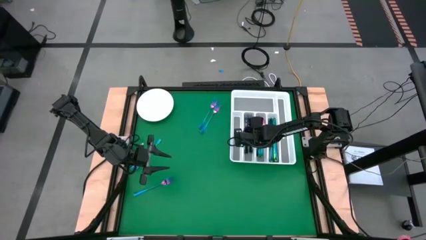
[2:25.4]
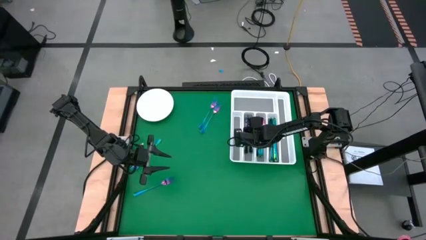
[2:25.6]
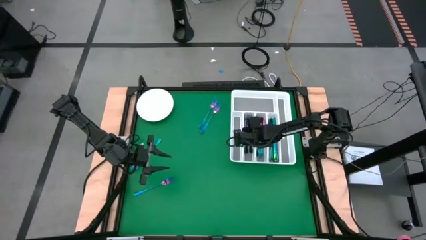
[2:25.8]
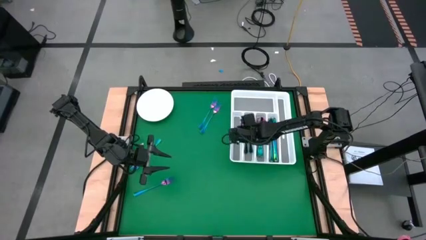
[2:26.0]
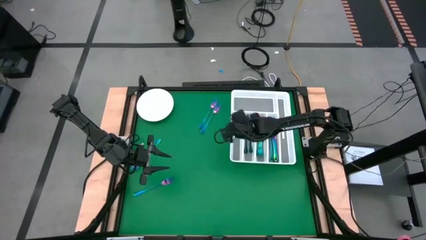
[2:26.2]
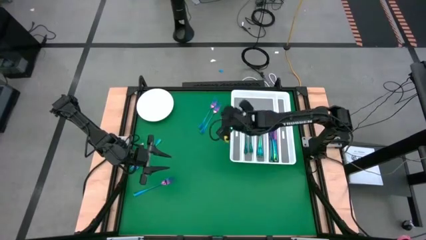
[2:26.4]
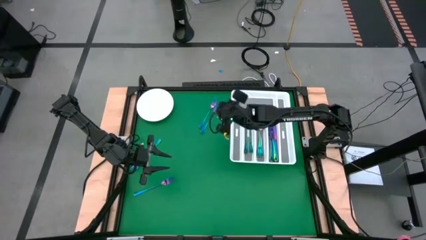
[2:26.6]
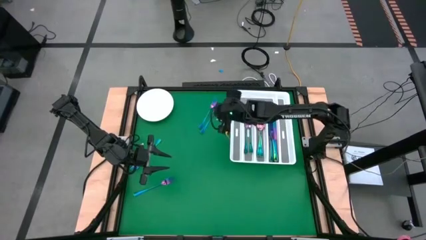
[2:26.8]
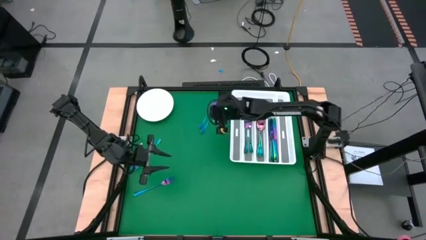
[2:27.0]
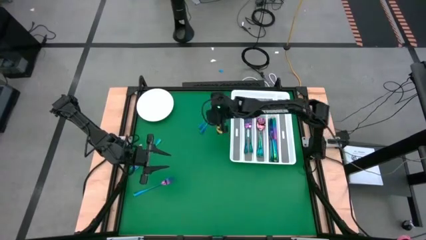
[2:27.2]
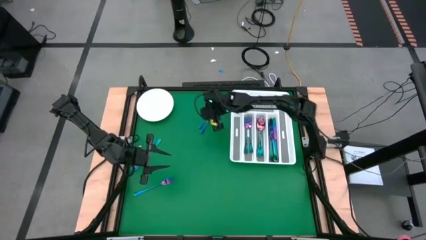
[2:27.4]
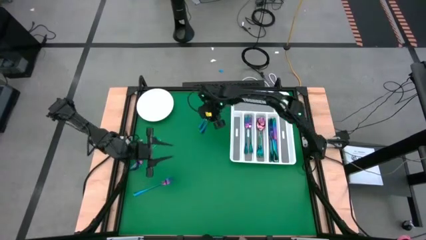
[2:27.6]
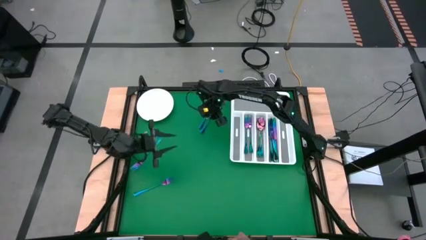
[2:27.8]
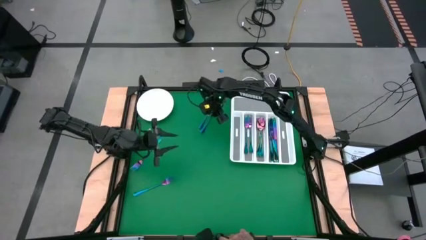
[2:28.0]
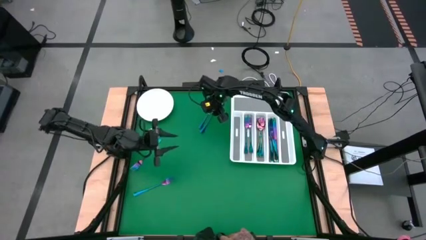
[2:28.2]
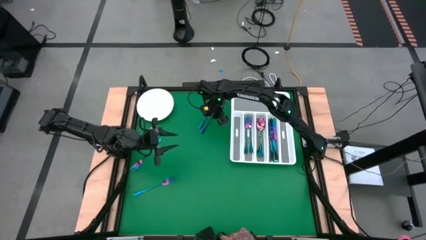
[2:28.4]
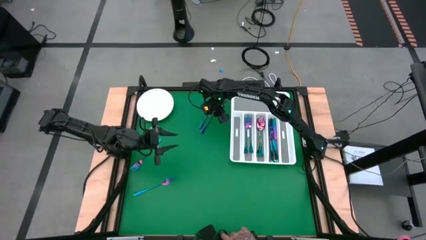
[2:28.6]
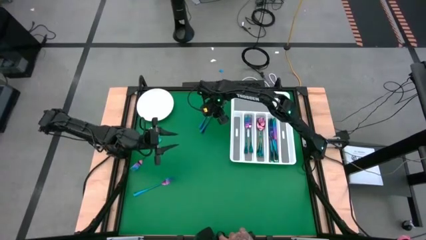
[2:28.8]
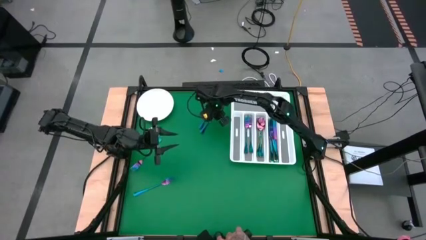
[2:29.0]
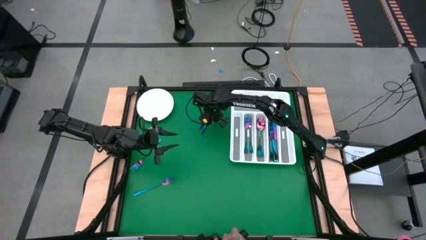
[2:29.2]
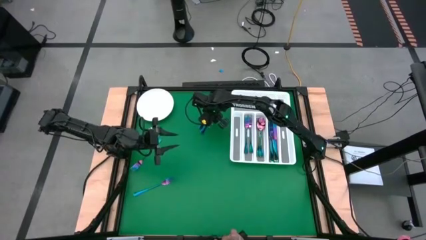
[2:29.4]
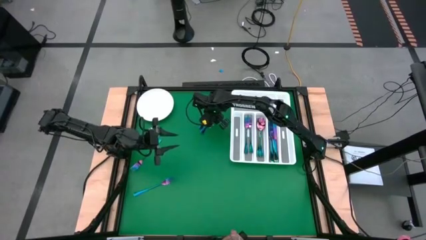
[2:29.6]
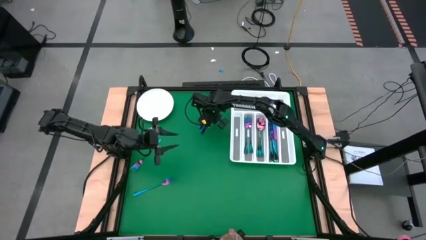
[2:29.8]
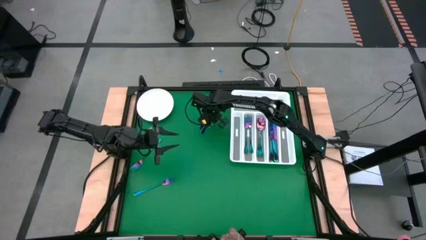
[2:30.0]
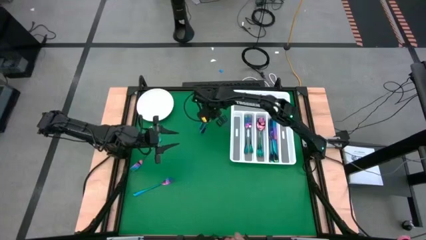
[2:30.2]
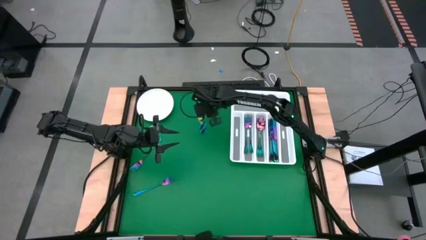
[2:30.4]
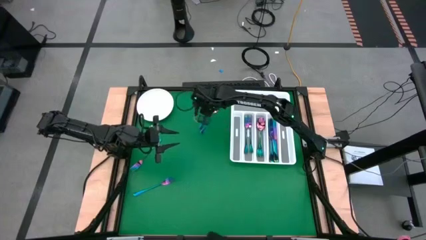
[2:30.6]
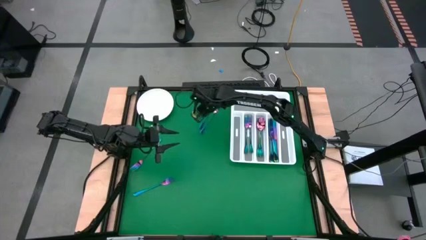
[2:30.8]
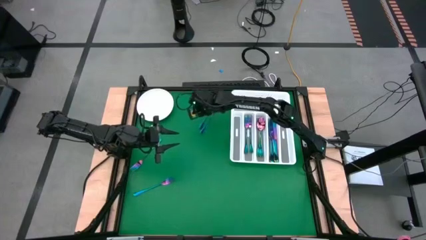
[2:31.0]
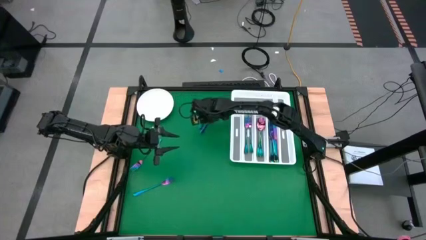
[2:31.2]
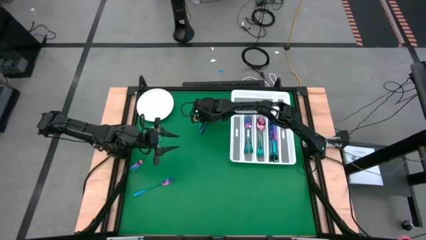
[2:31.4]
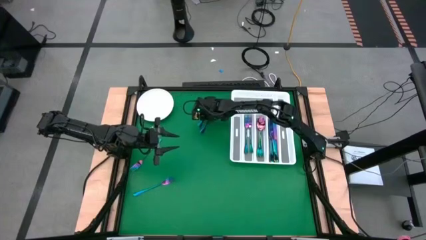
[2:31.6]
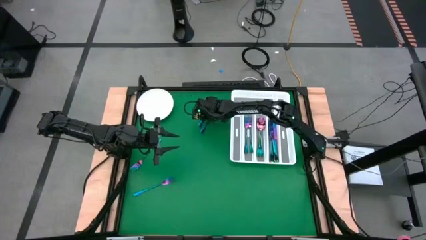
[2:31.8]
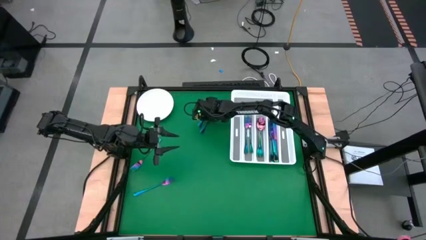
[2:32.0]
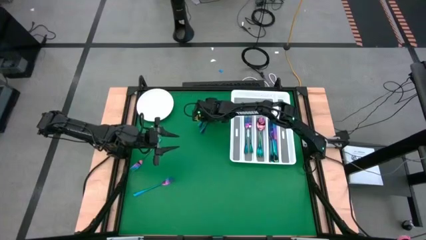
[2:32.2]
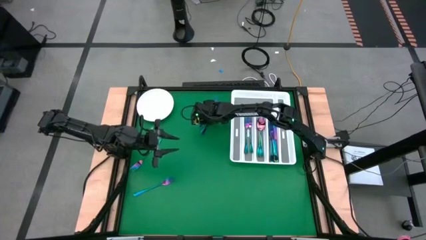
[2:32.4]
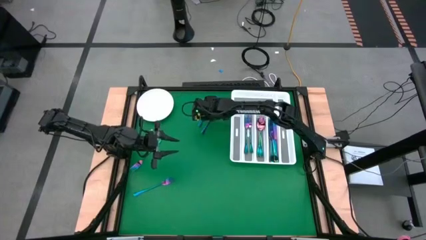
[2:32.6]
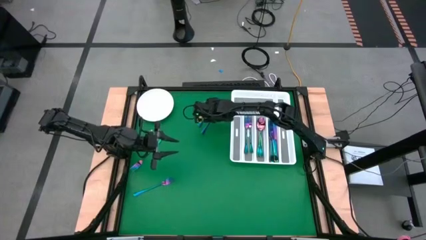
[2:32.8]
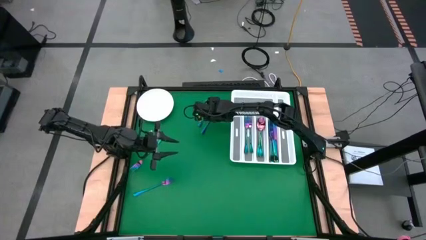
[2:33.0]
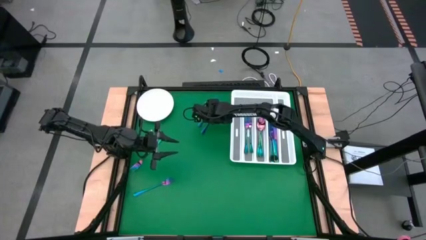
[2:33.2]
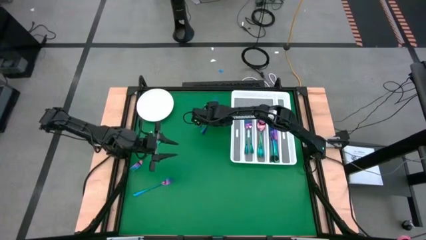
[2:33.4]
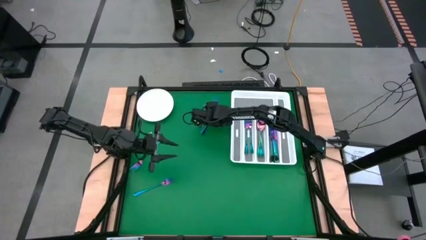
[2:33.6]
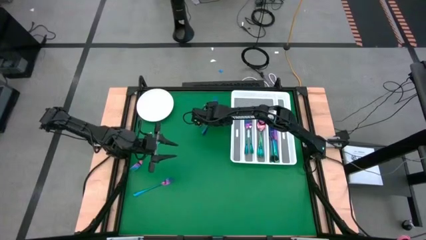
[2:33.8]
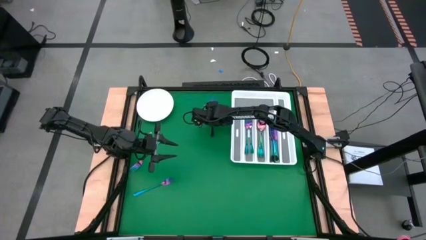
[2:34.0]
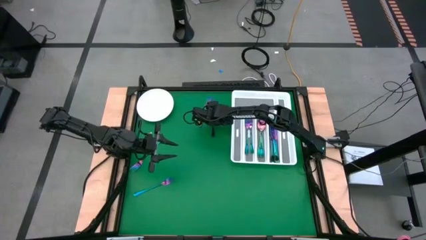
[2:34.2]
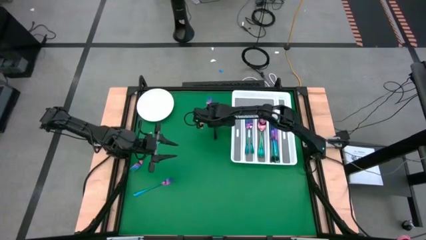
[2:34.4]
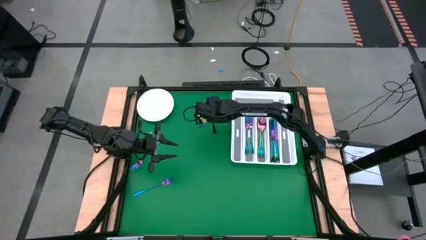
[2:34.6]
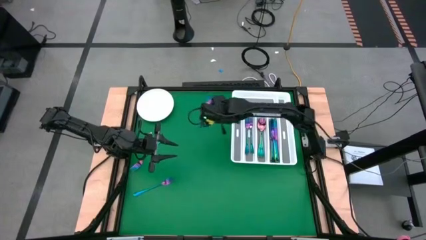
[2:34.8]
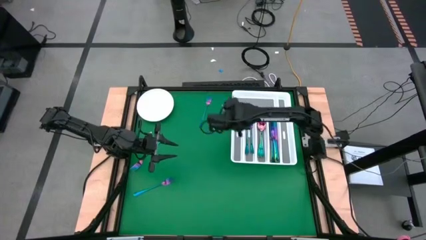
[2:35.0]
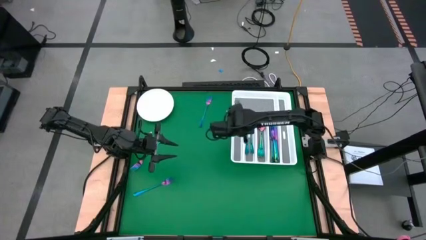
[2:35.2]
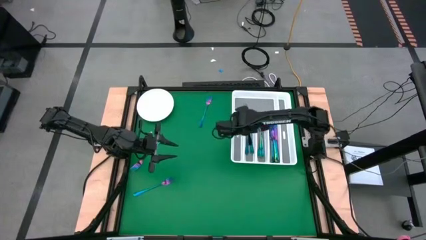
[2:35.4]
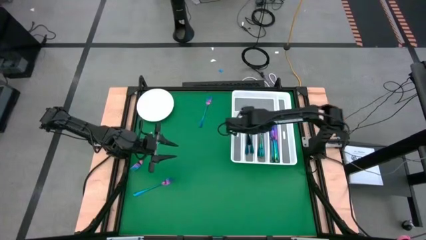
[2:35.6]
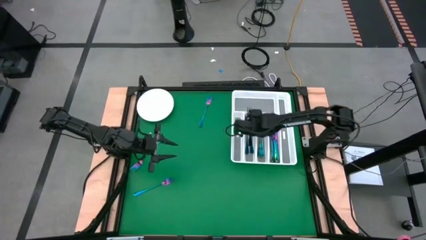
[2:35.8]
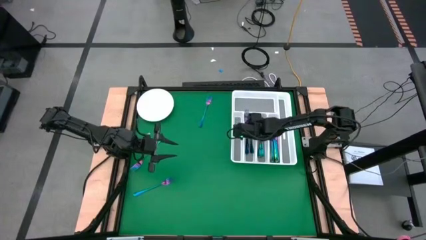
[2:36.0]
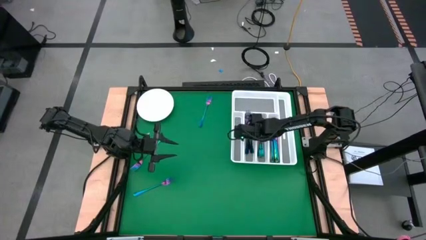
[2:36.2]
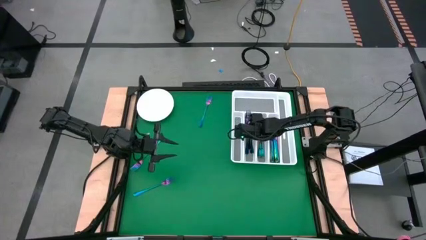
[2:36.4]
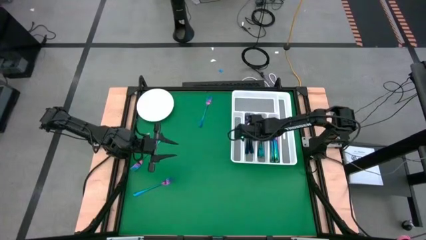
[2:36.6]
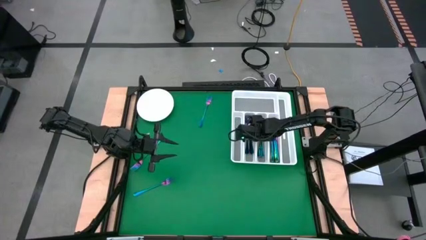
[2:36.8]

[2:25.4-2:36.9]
Task: Sort silverware
Put the blue fork into the white cutlery tray

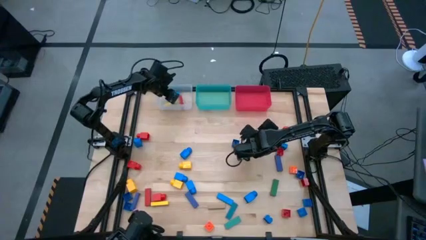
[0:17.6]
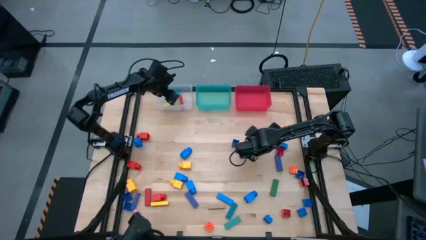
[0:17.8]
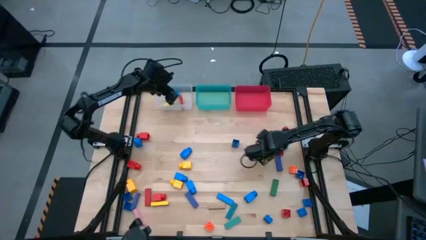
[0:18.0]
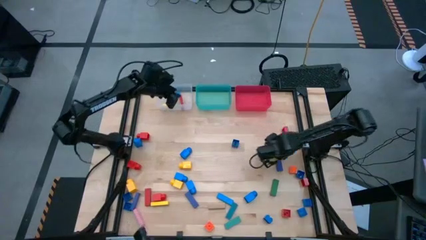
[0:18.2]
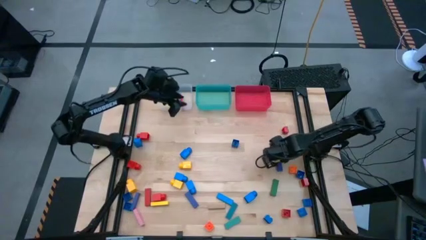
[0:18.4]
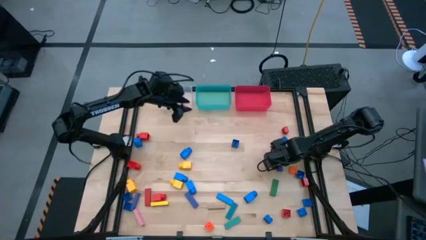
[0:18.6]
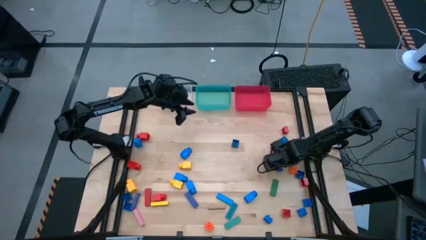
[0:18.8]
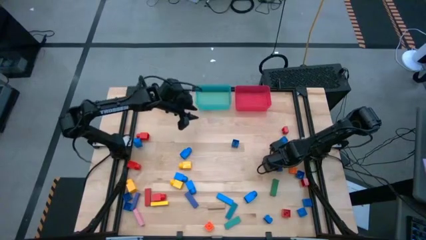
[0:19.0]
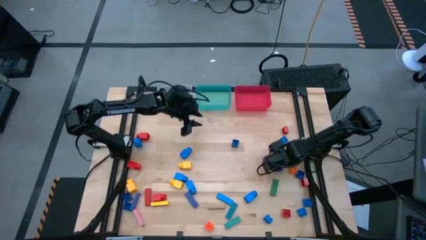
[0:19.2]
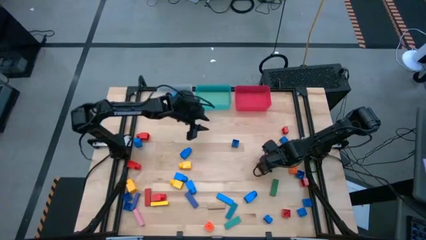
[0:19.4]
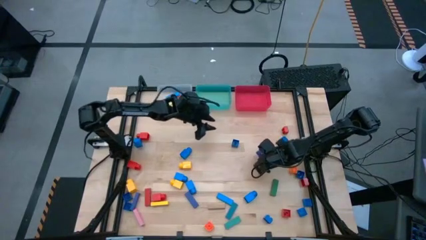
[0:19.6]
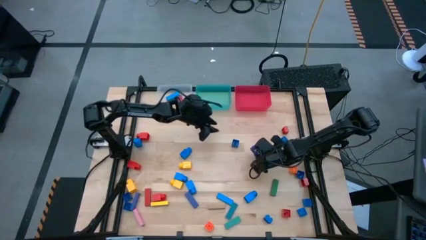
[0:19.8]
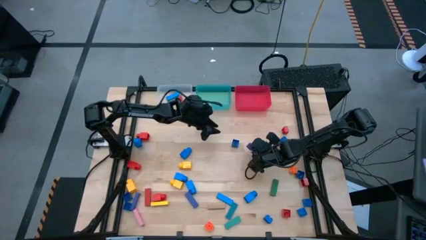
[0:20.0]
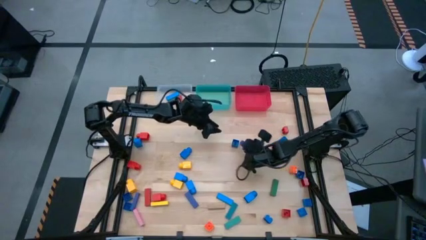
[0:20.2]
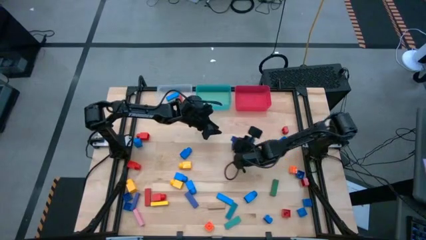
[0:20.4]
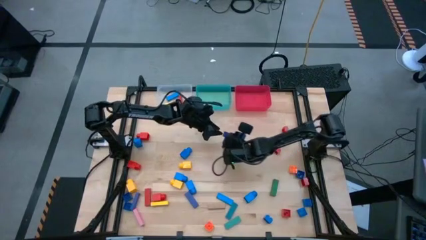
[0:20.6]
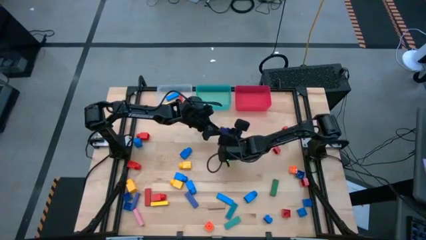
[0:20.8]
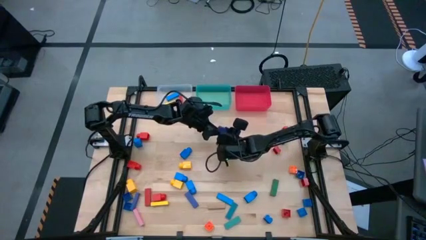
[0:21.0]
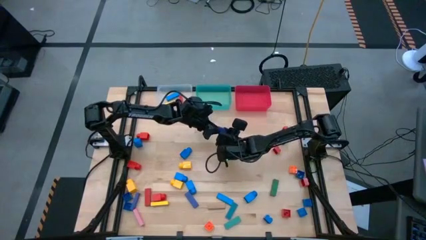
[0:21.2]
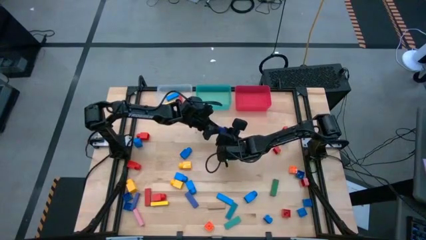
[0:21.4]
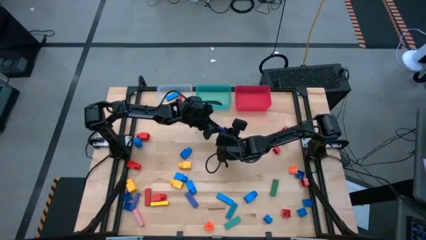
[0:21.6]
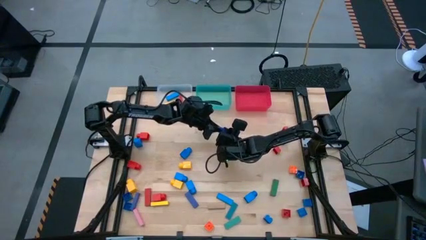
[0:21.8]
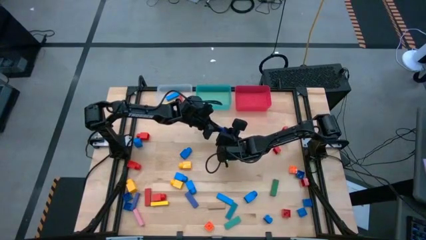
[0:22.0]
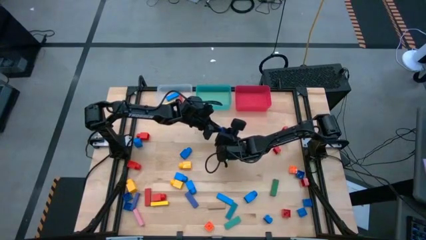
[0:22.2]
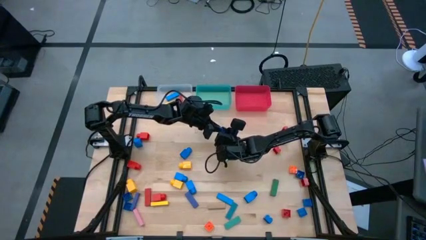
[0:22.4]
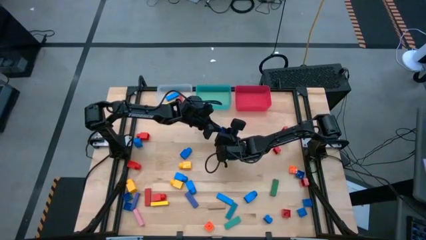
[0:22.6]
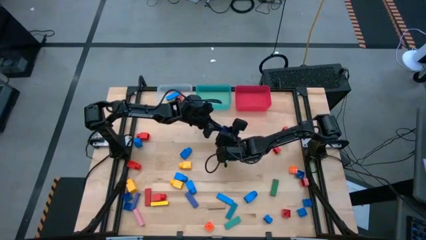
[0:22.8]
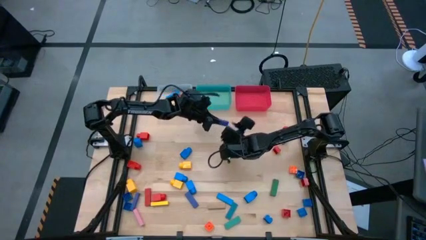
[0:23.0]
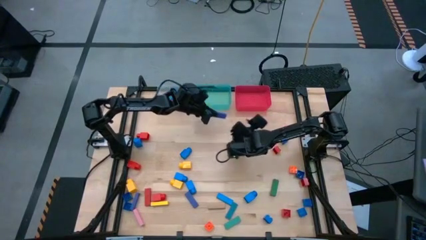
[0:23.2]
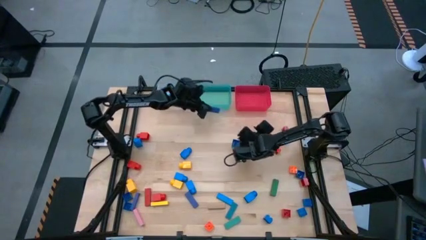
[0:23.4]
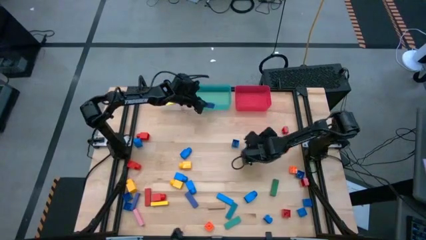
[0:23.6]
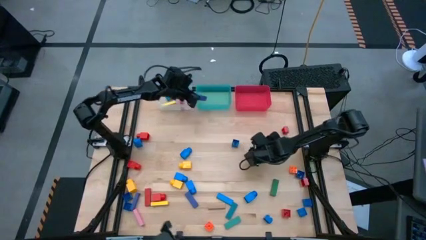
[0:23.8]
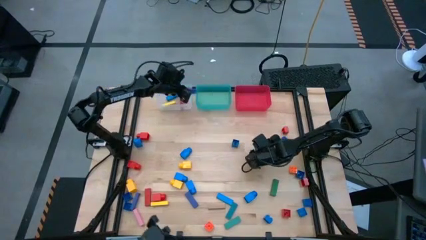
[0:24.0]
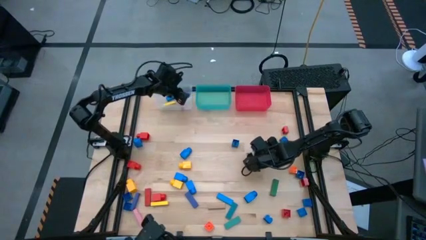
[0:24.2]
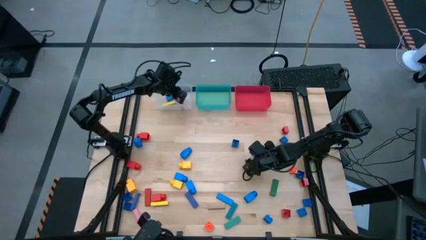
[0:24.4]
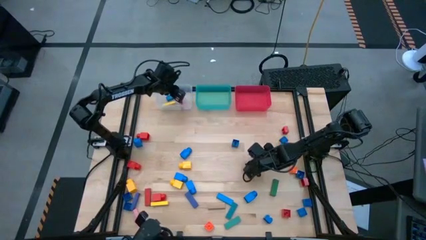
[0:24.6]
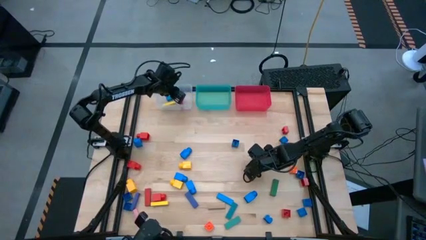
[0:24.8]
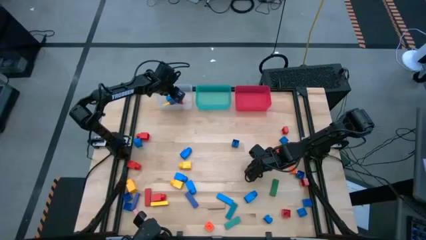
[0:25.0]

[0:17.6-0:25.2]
Task: Sort blocks by size
Put the dark blue block into the transparent bin
